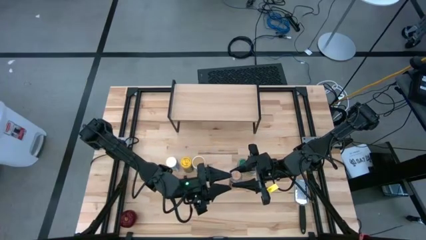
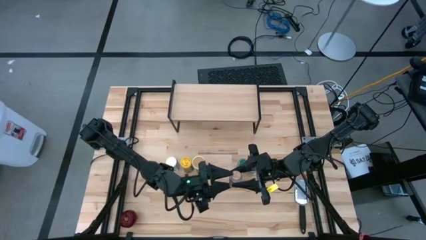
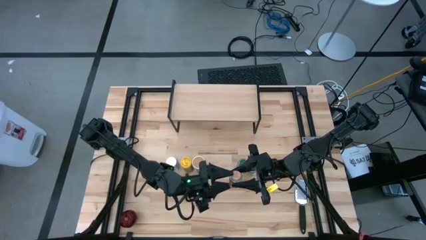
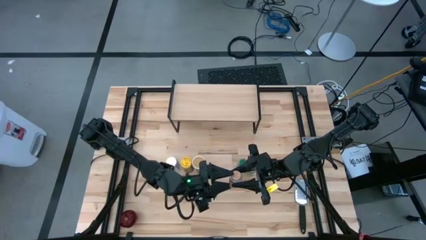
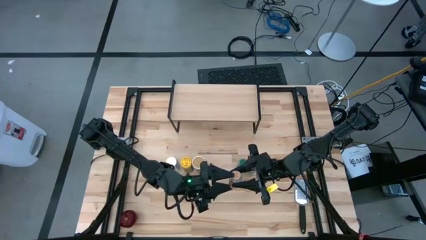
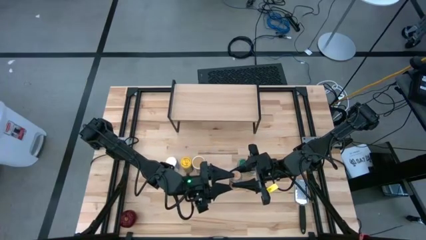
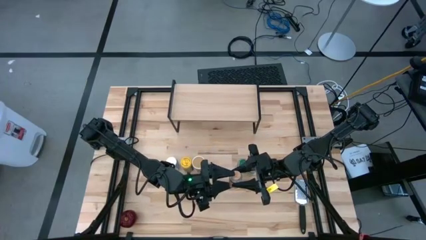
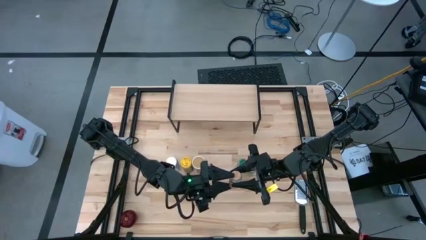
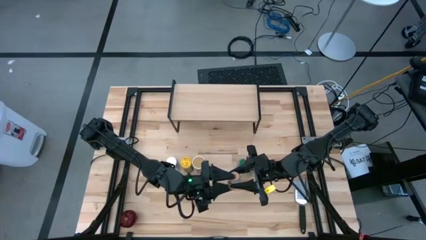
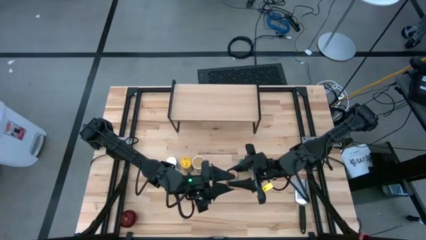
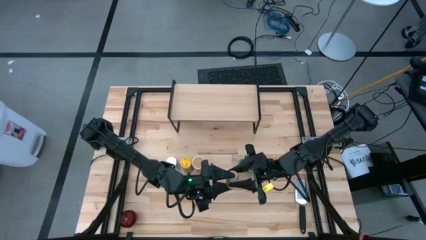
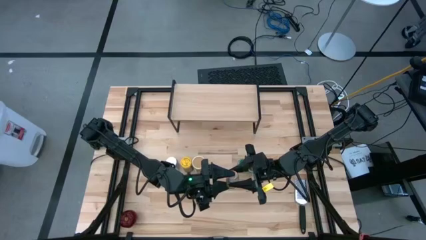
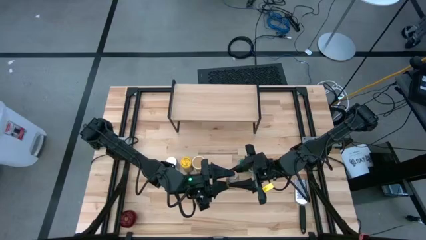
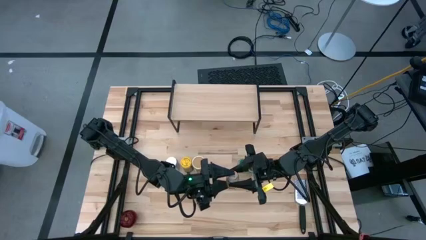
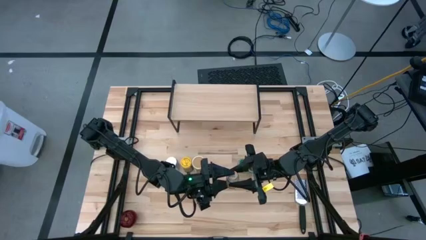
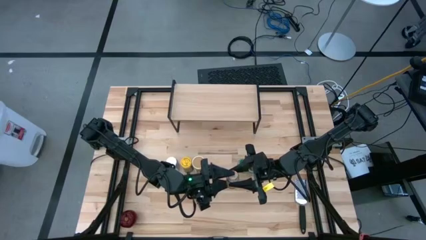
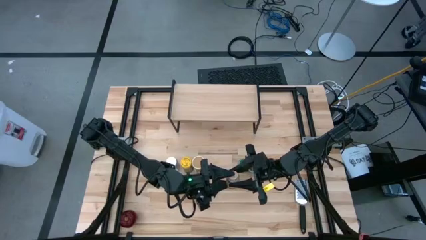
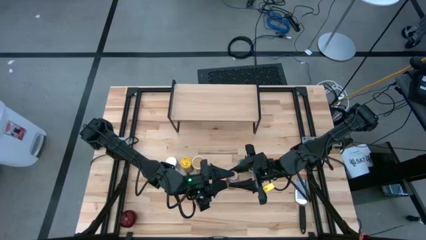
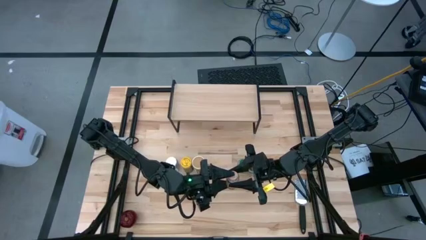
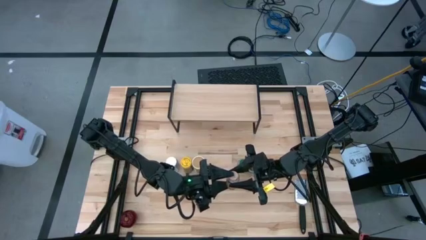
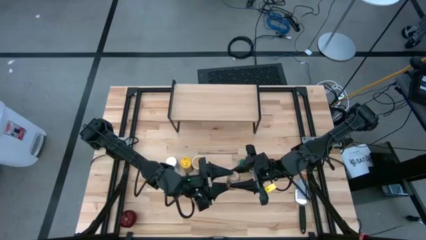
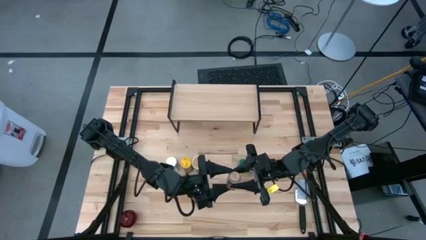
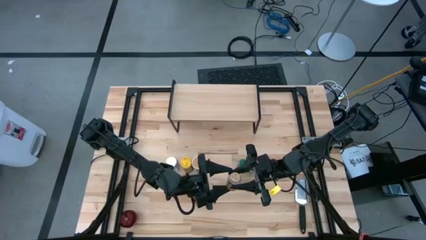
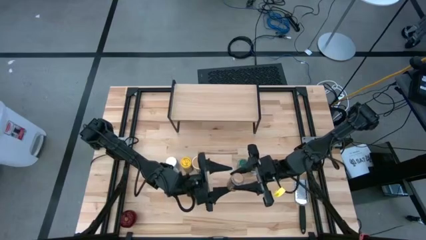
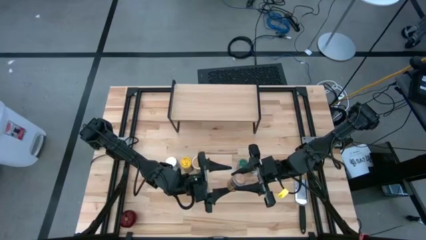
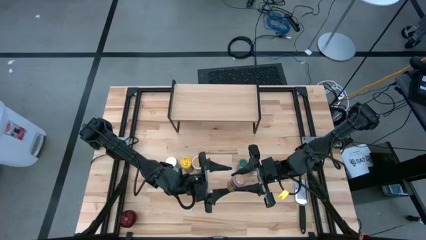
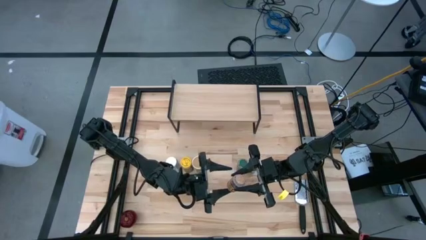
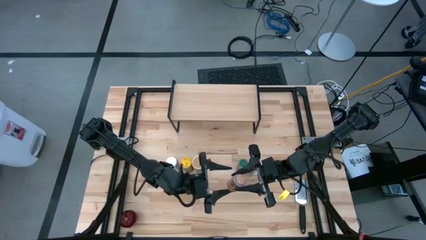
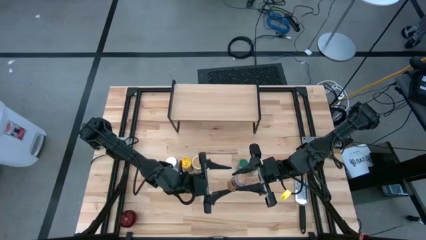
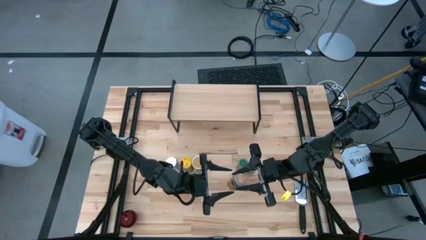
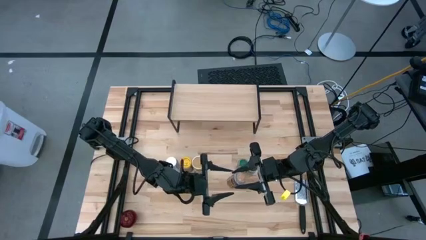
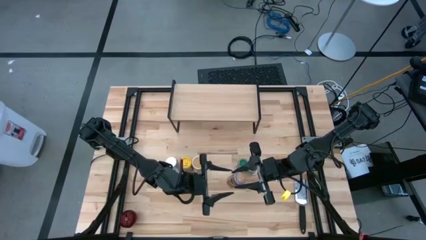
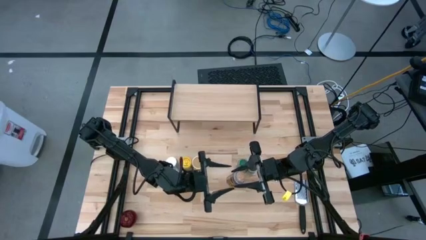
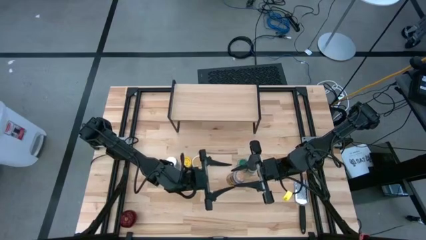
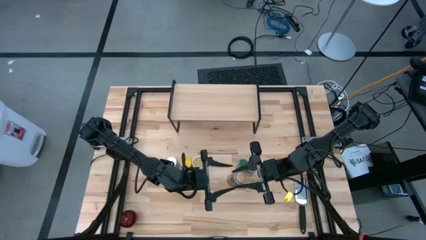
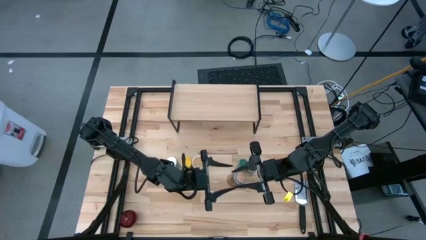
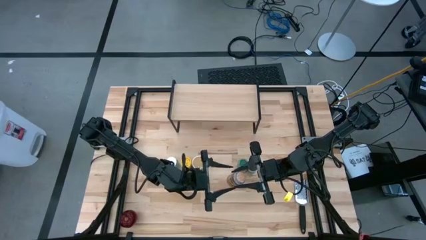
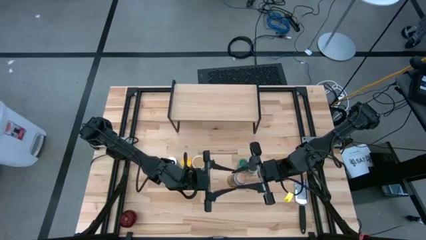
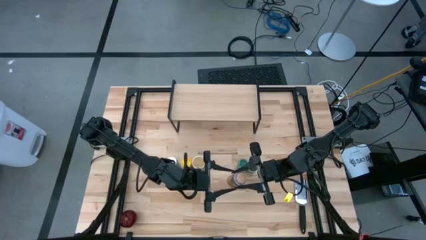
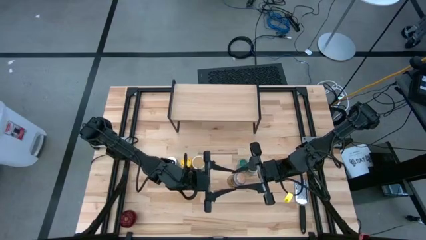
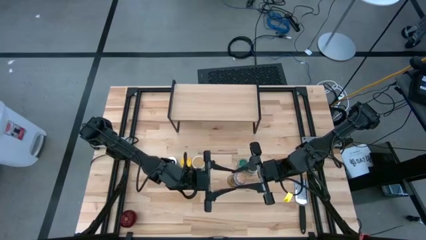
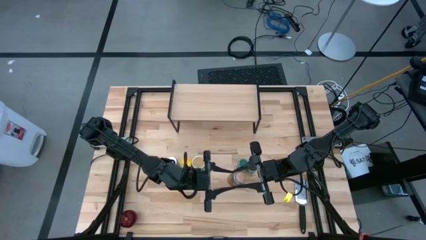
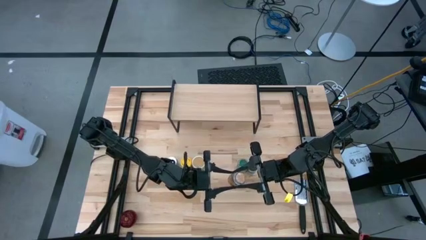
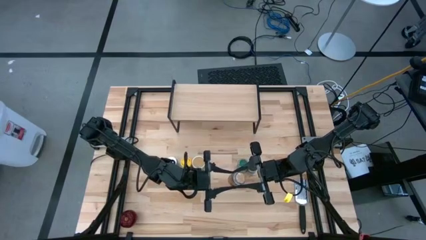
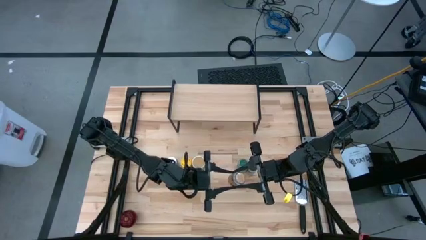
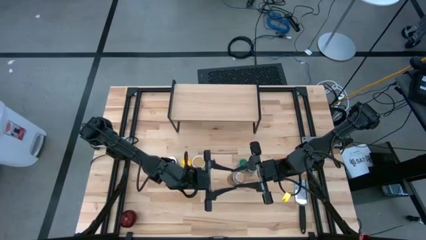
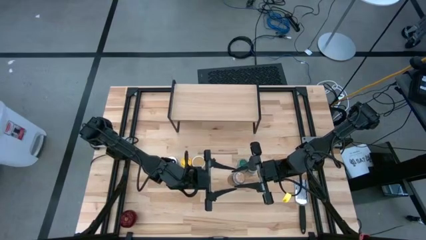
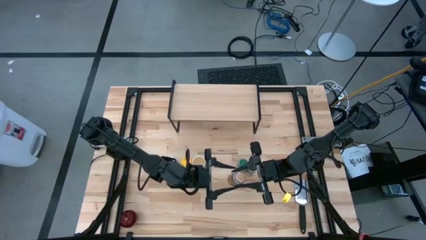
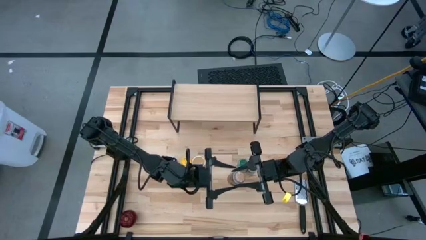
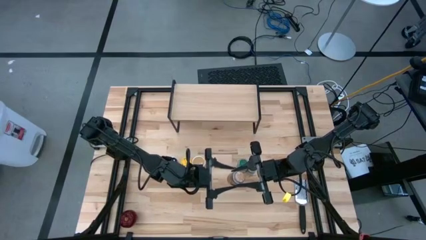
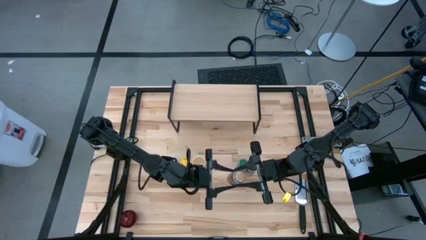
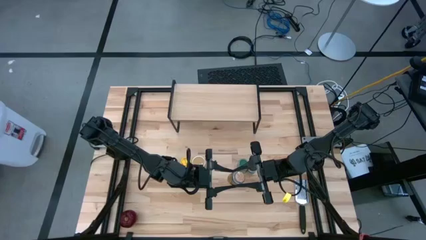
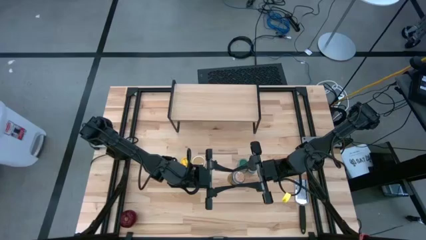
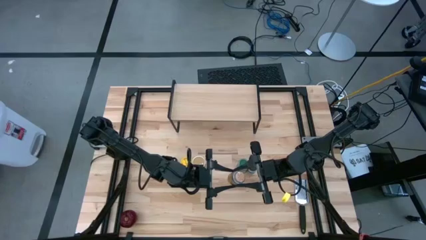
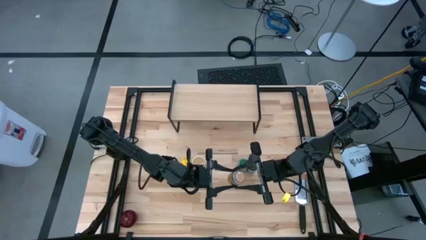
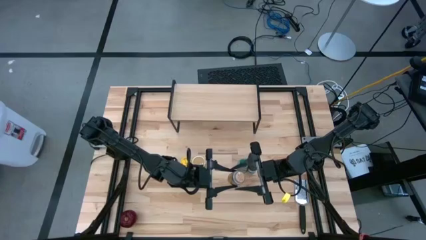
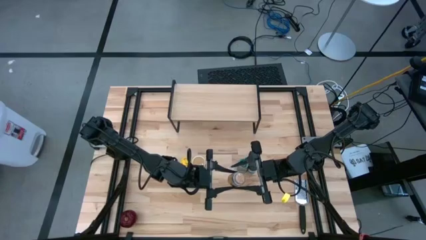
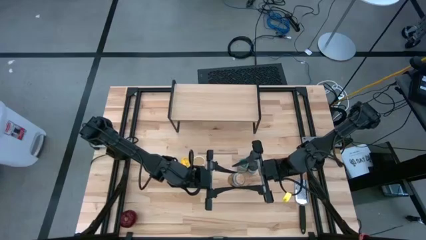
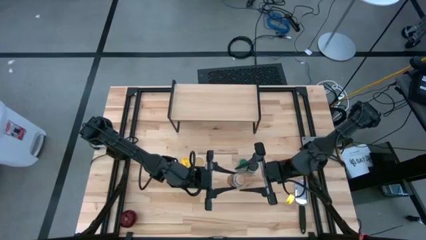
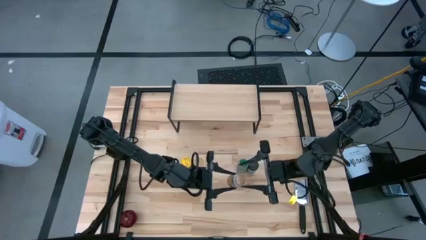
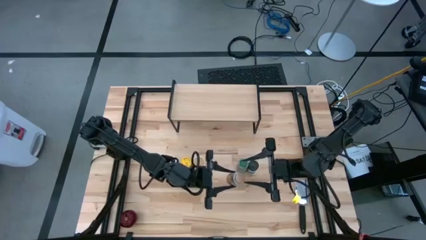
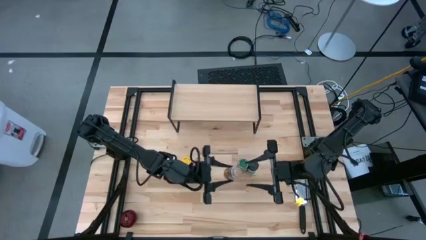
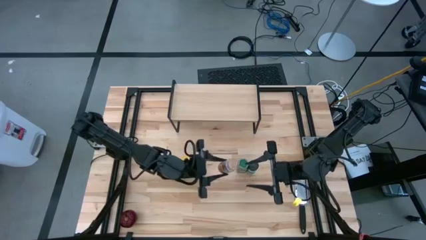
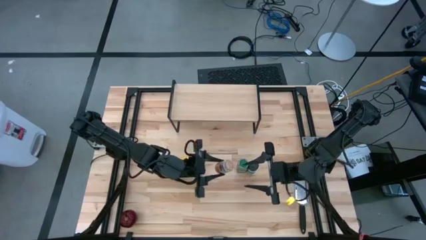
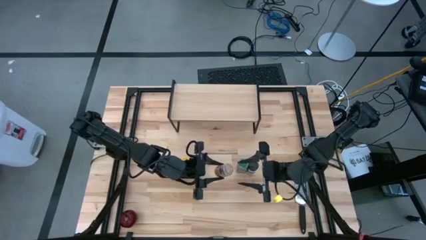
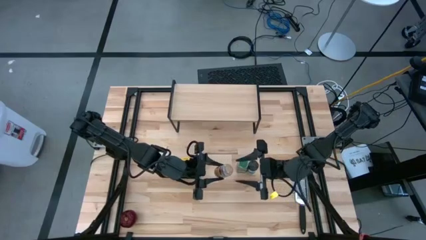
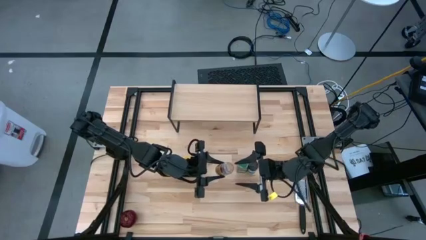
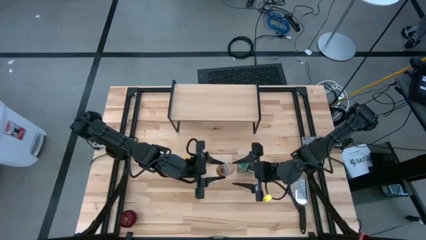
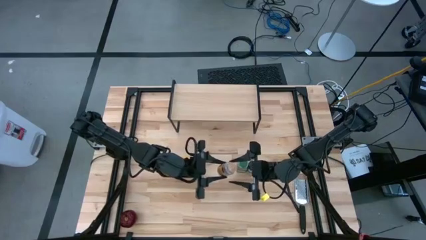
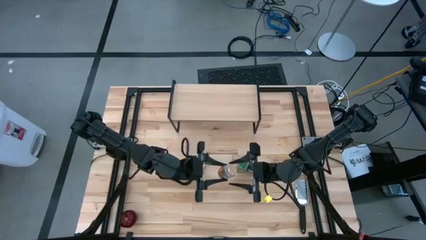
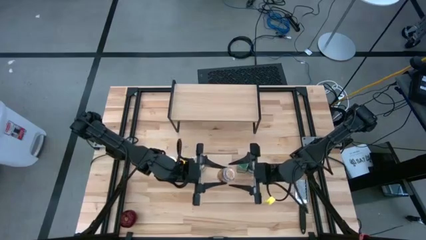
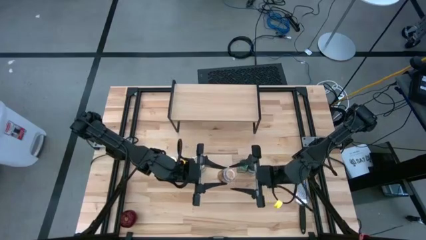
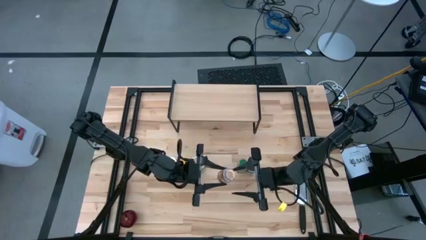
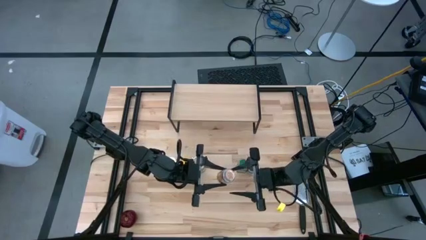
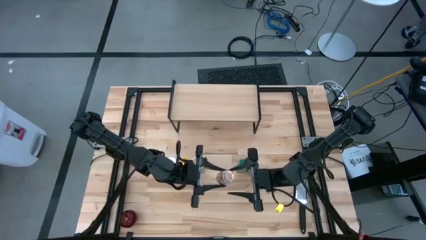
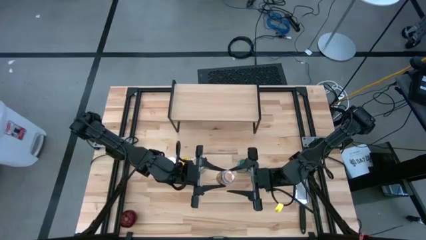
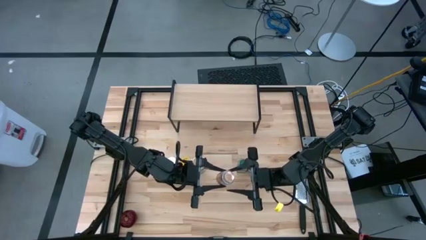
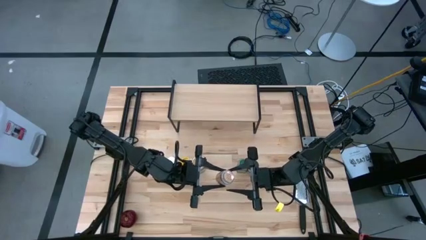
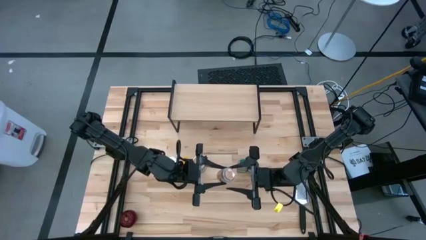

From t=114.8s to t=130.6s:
Task: Shelf spices
Put the transparent seasoning bottle on the shelf
